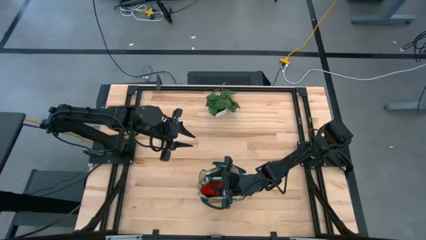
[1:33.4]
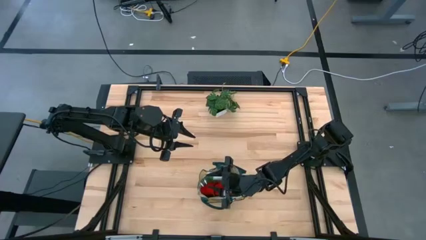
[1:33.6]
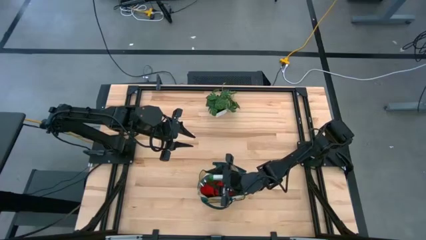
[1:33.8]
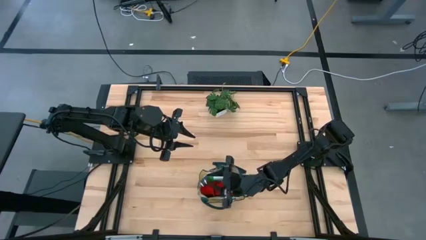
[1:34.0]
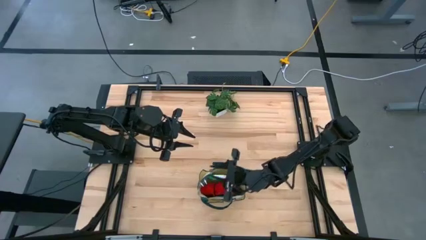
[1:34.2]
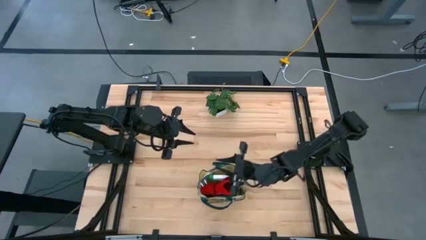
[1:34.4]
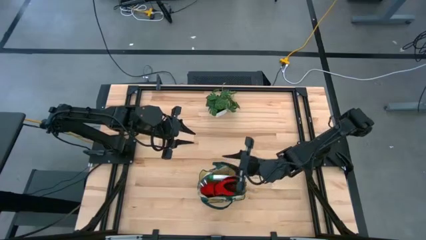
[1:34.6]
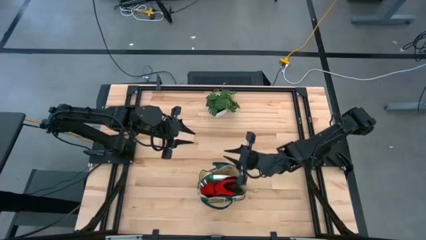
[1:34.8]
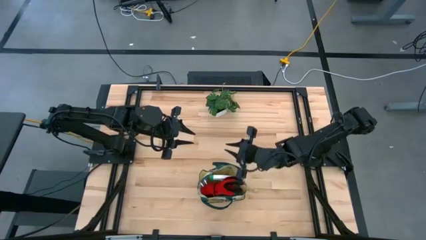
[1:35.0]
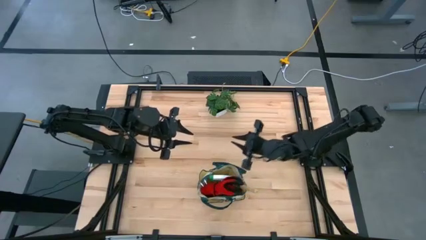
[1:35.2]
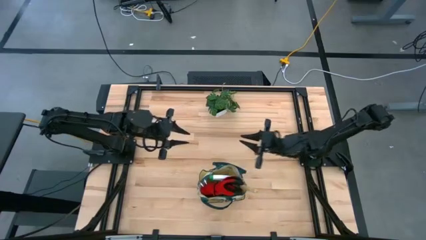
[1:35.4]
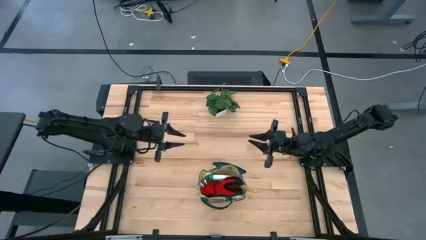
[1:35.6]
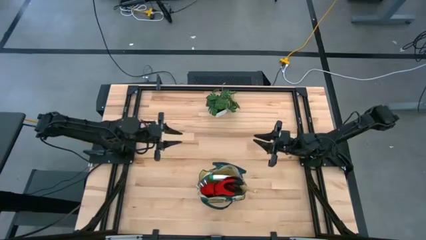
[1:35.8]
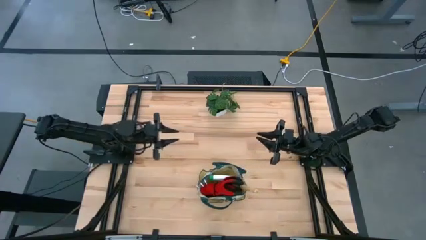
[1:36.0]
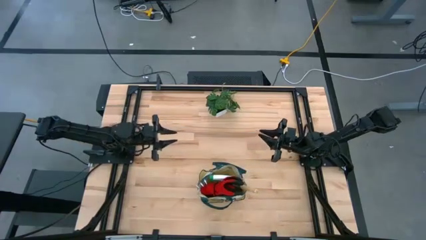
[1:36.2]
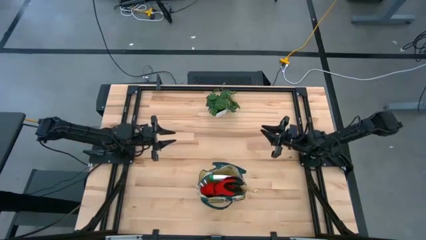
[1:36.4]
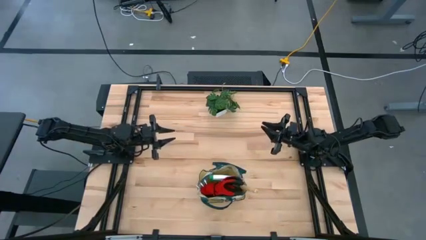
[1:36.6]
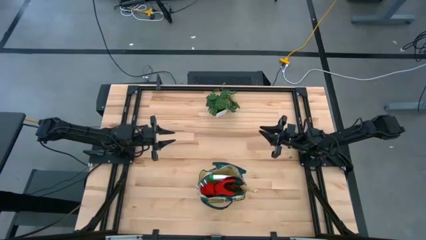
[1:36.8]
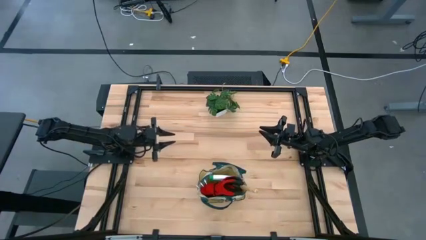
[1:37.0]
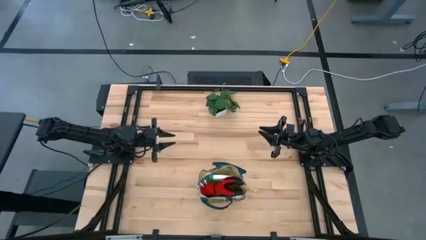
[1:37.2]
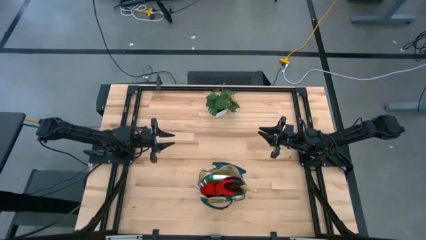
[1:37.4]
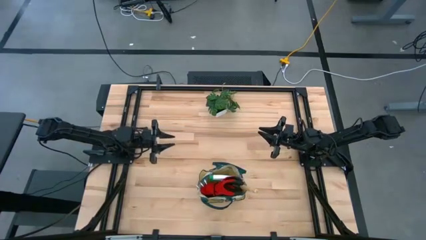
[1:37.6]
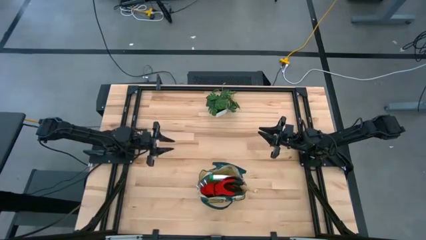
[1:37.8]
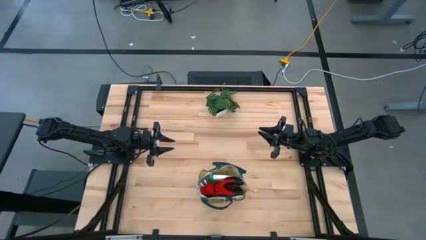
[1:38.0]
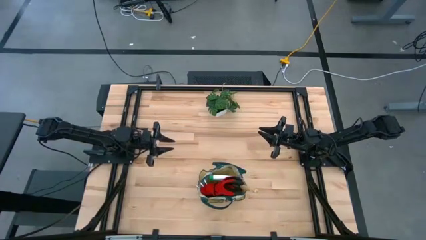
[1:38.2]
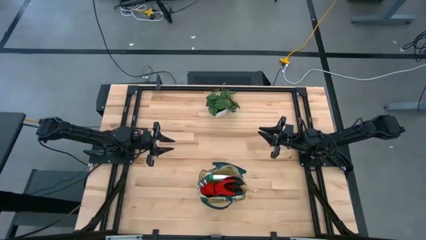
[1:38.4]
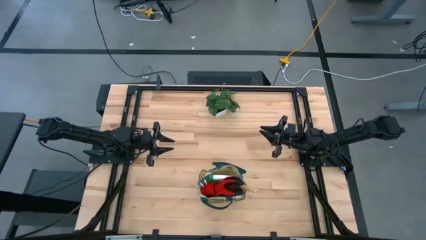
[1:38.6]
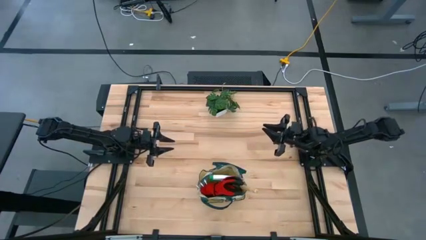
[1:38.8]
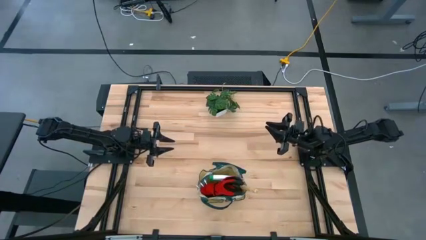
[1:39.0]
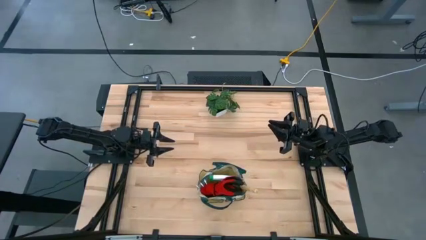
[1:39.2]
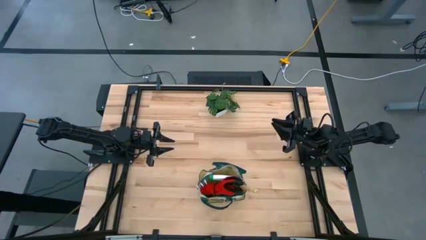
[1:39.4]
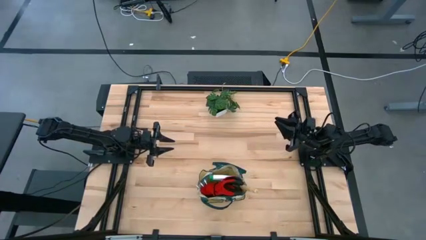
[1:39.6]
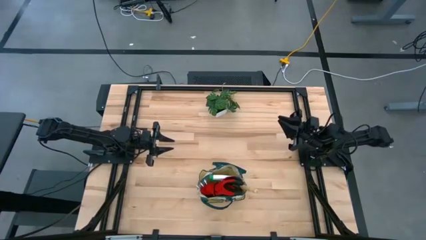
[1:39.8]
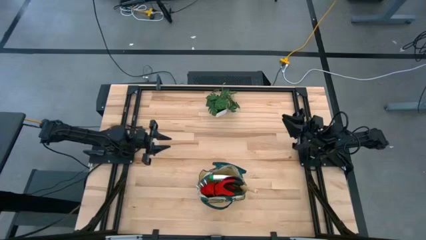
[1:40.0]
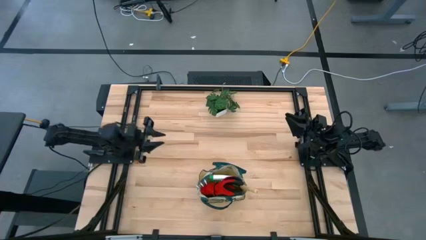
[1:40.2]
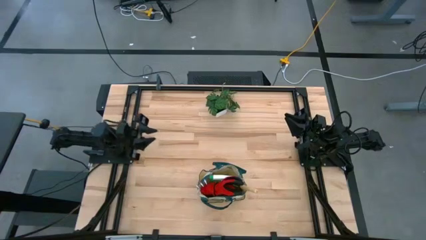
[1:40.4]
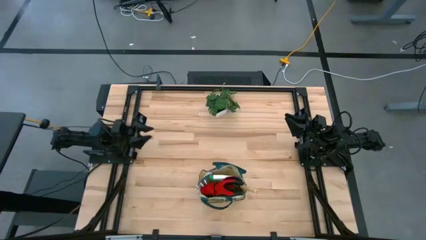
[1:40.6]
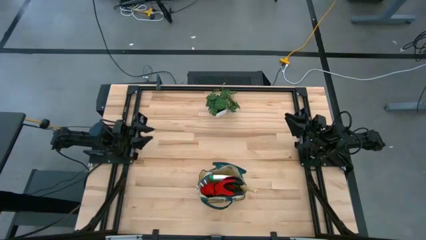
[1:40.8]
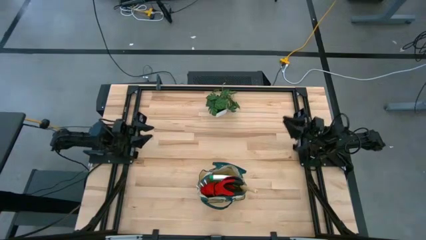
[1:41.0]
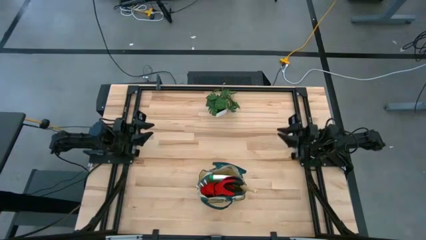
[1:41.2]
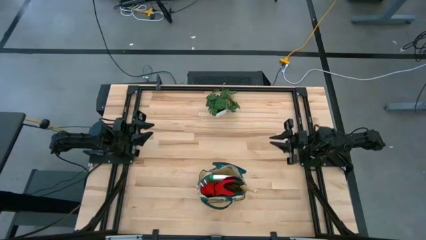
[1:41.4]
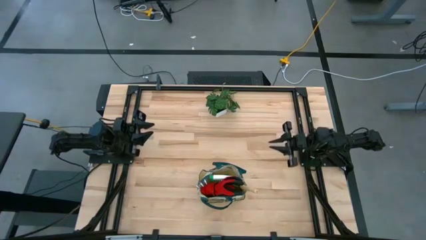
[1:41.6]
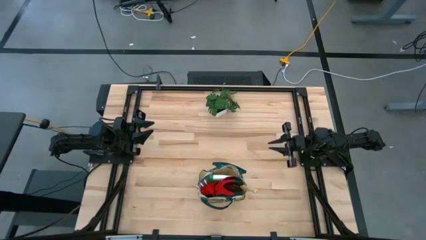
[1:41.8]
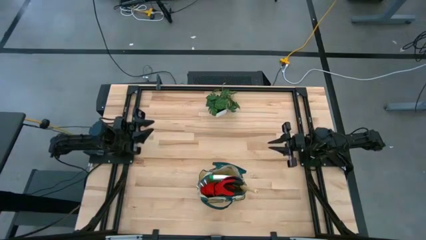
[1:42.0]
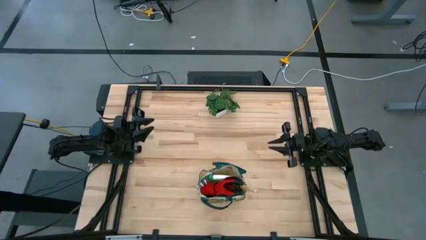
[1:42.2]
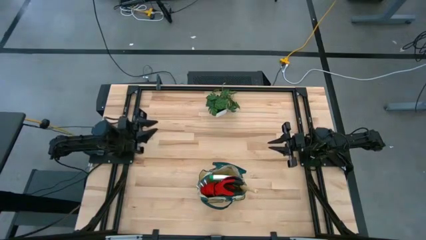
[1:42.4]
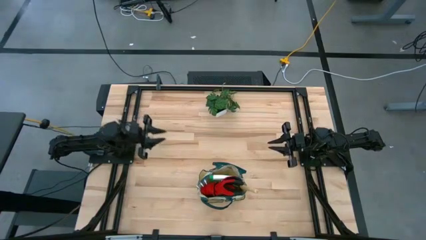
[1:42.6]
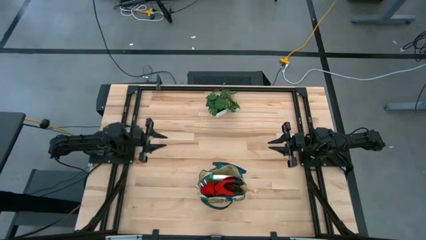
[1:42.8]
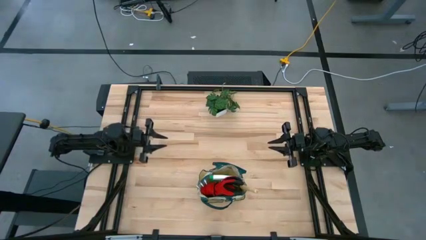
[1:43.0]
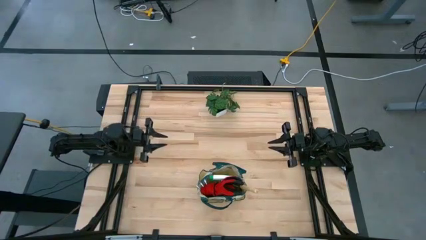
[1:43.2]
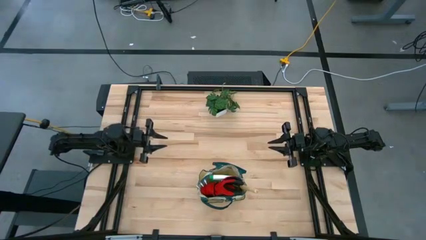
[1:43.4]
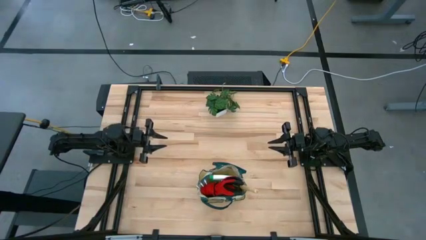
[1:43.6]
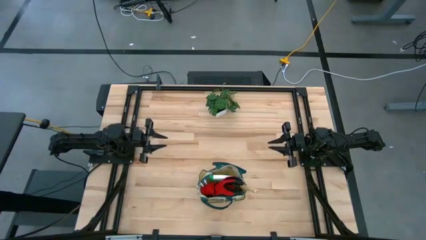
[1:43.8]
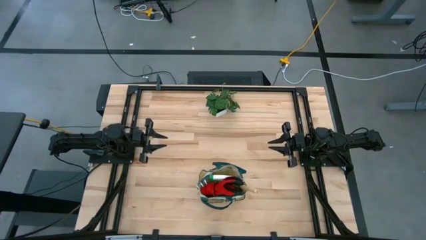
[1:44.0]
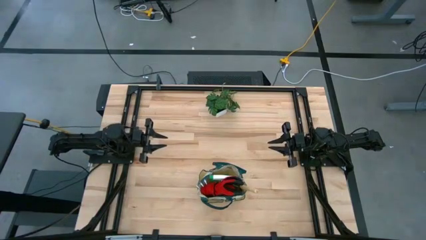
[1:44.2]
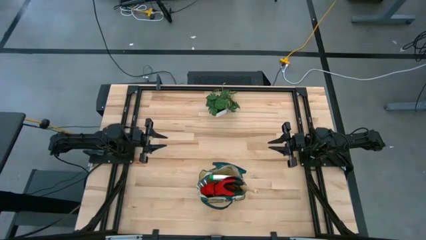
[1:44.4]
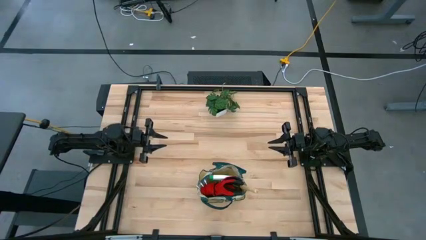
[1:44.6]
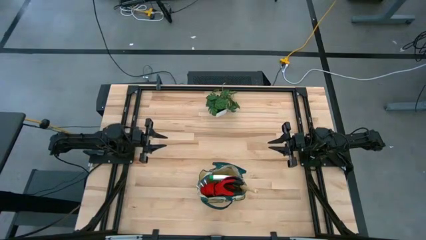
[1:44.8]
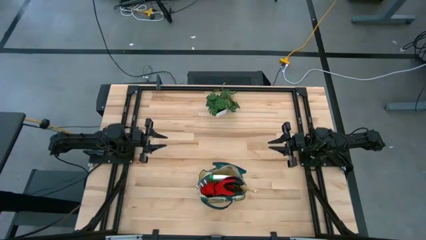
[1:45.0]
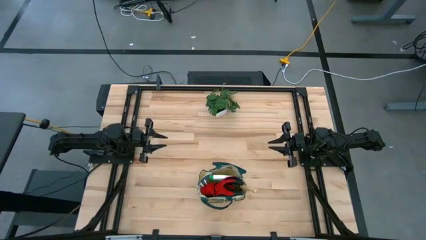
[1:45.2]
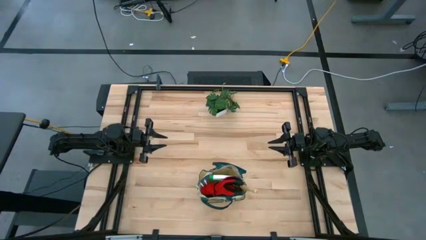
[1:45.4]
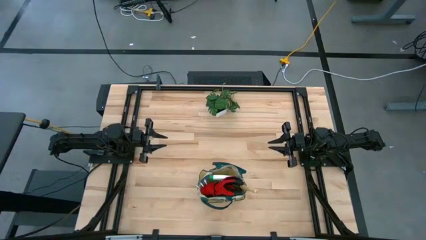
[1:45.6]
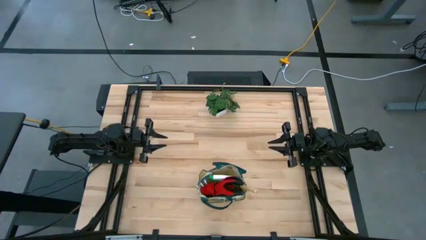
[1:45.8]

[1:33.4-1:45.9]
Task: Pick & Place Garden tools in Gardening bag
Return to home position

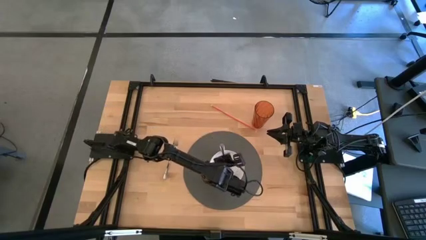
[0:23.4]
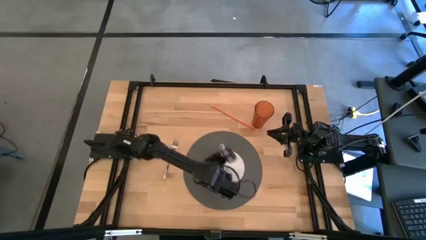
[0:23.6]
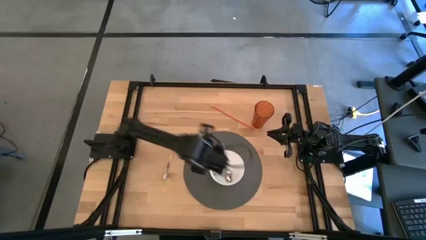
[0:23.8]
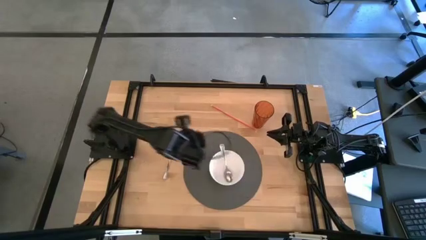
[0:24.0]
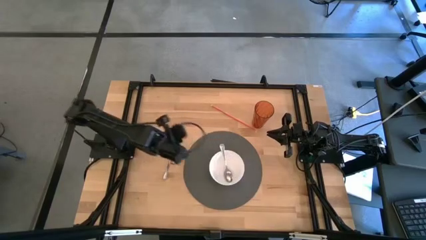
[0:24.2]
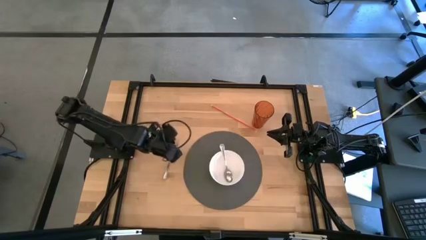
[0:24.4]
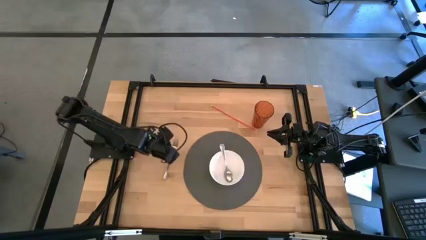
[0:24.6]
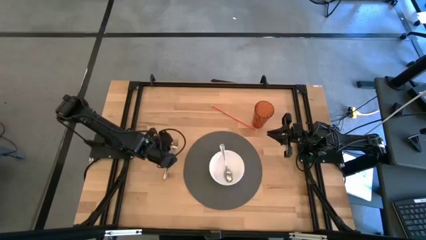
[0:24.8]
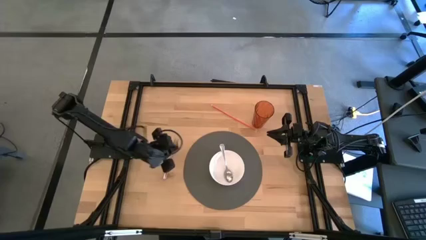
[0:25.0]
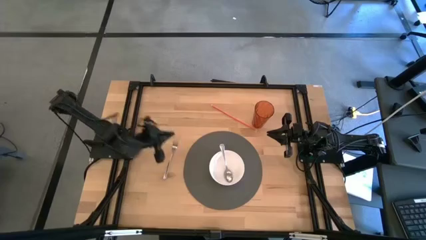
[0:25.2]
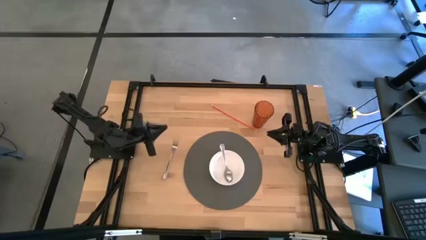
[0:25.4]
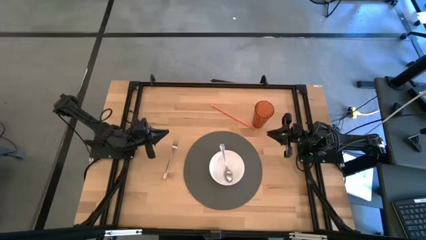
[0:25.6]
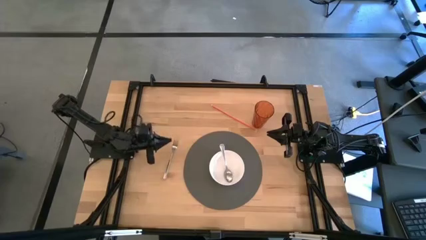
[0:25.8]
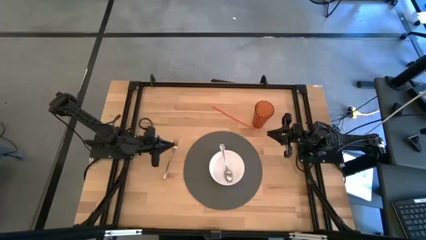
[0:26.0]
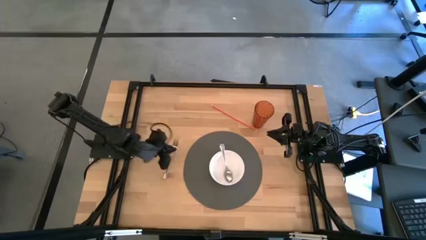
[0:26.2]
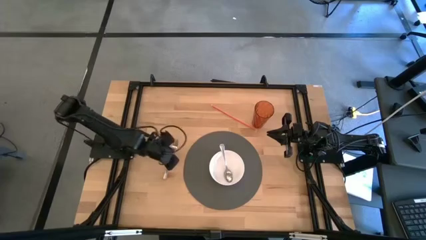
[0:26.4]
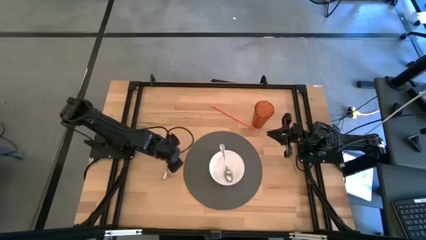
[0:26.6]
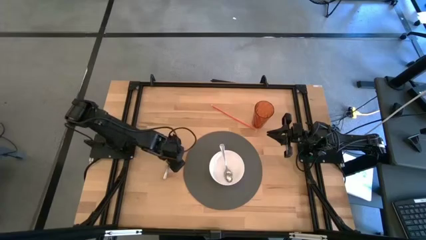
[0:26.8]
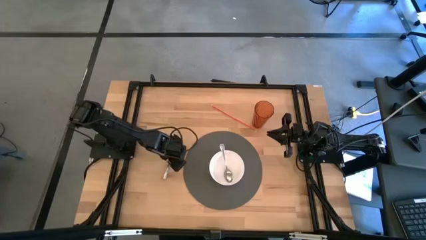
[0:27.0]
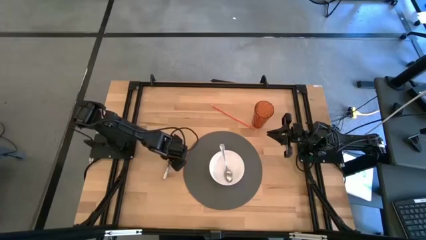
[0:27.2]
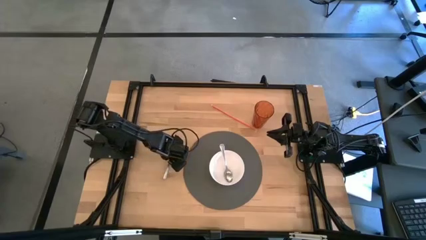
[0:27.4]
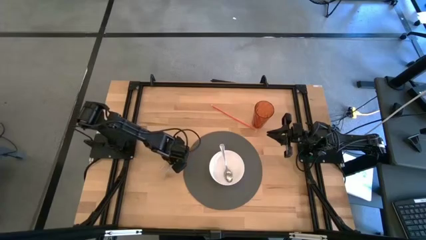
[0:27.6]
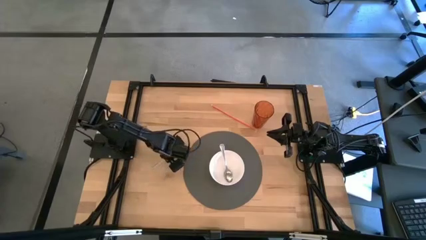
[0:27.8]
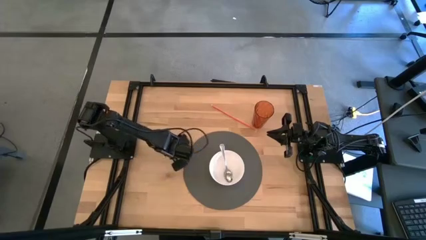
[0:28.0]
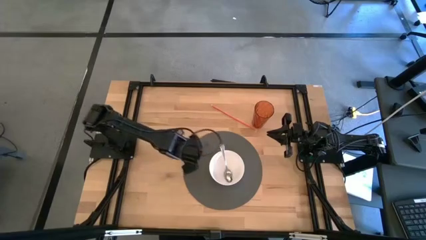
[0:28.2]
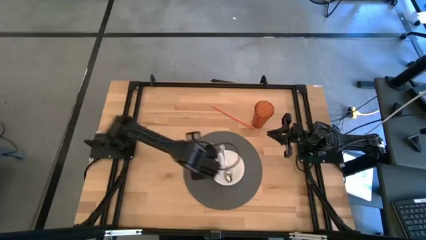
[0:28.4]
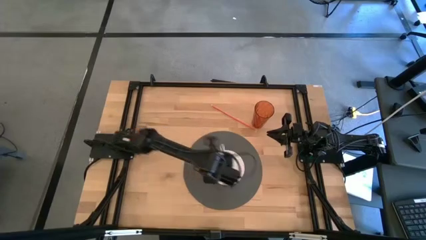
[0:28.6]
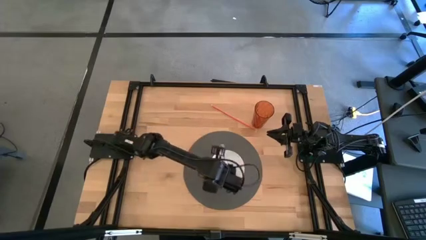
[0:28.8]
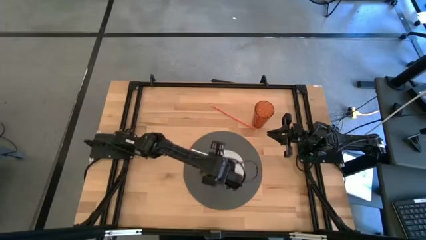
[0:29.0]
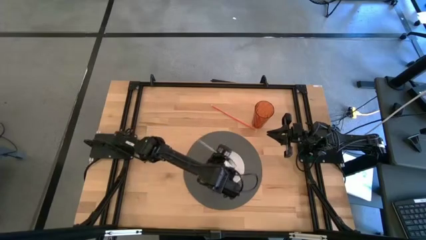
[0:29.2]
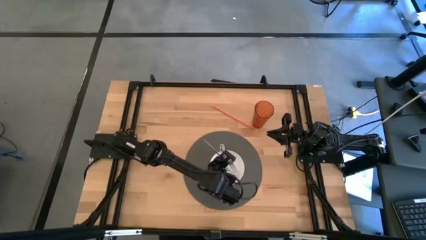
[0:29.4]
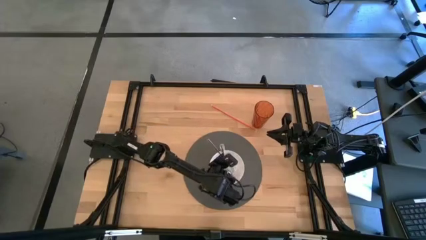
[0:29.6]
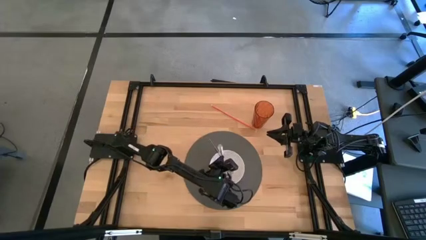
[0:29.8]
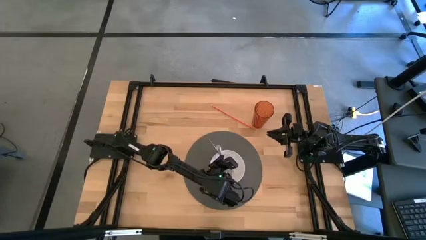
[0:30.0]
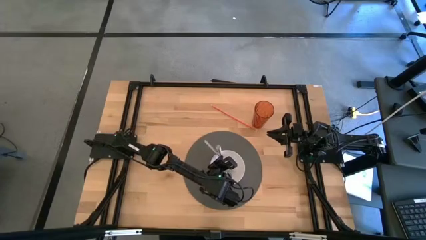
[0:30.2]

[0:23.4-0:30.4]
Task: Pick & Place Utensil
Put the silver fork into the white bowl on the gray mat
